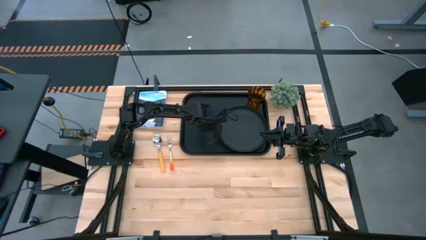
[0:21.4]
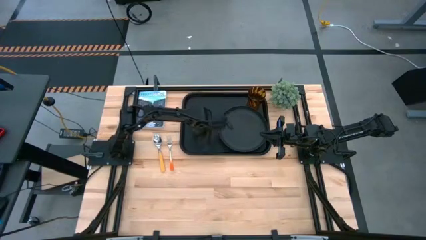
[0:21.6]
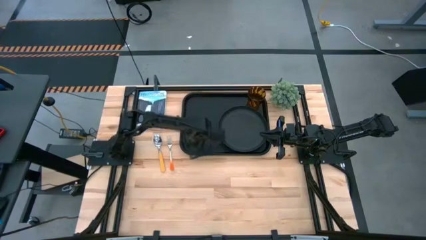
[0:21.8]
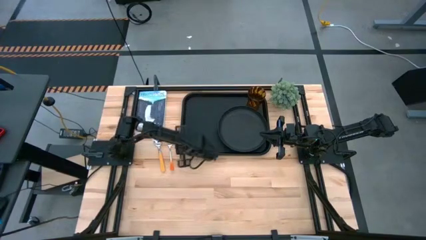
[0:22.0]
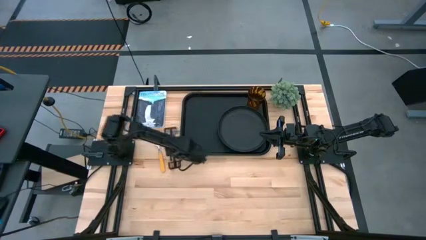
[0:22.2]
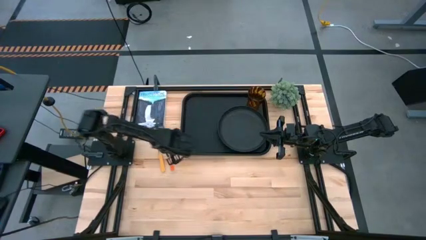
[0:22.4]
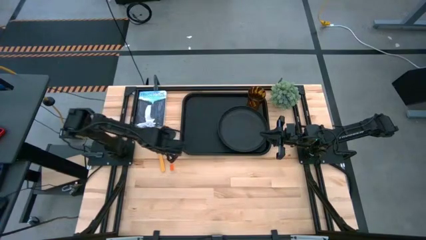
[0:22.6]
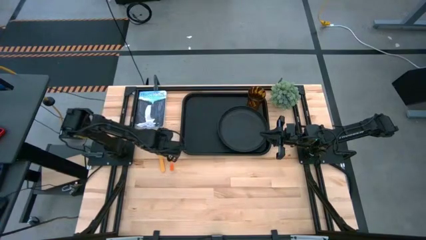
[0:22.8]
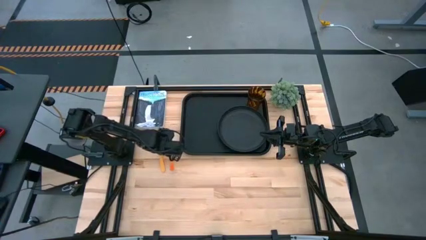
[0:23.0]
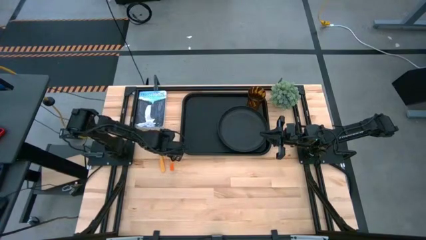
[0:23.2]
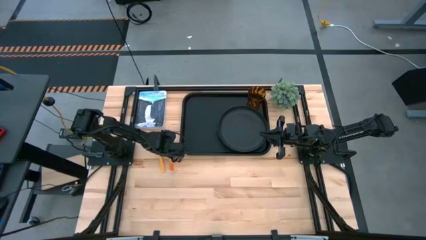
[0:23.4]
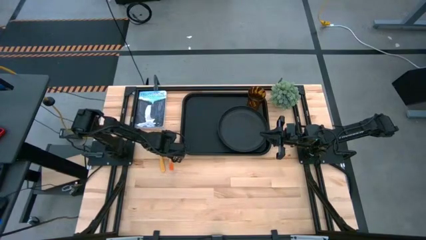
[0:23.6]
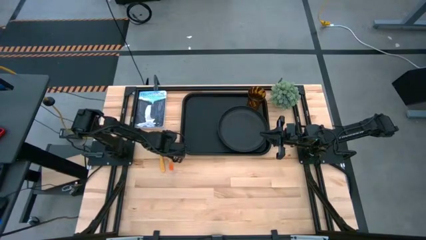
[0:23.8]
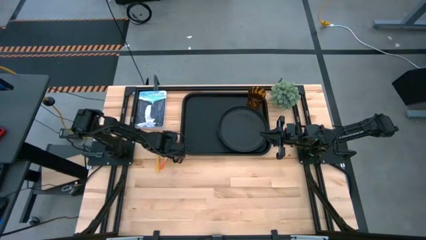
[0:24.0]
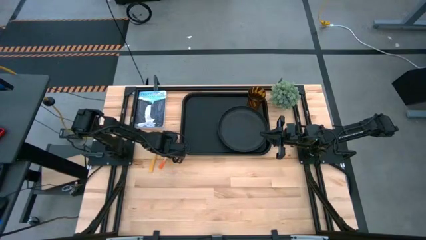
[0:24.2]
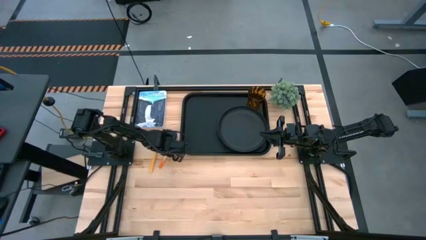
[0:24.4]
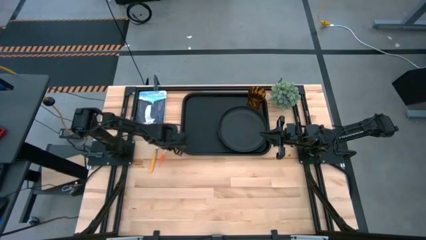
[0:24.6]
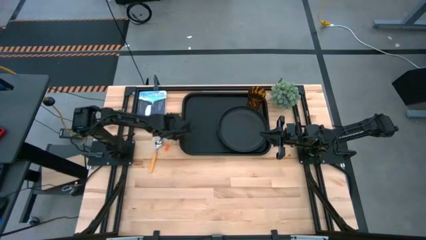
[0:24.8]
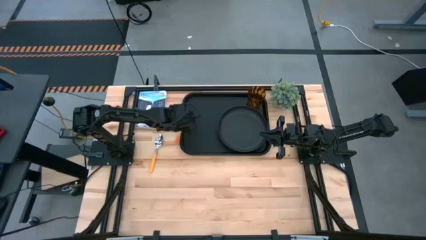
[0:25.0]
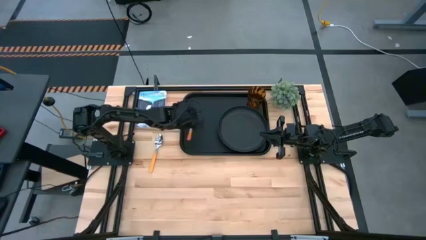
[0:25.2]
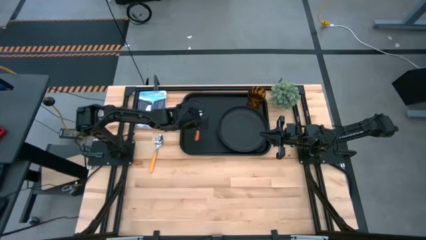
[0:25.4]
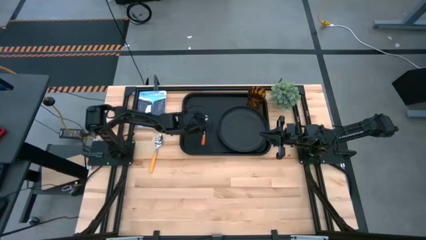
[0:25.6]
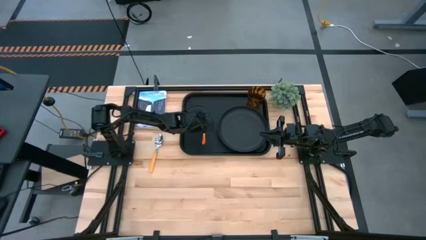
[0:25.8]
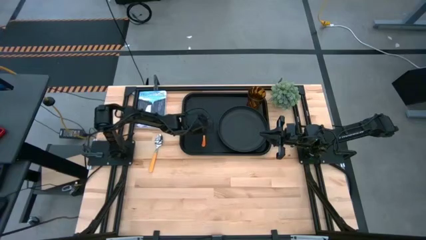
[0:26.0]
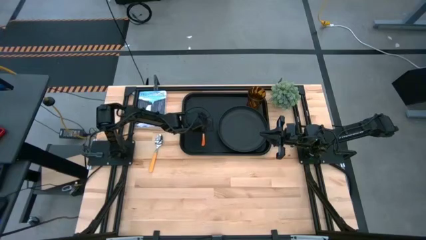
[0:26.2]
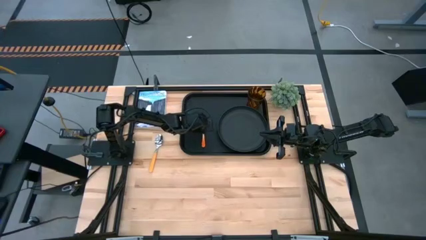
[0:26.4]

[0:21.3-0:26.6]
Task: Pick and place plate/cup/fork/spoon on tray
Put the orange fork on the black serving tray

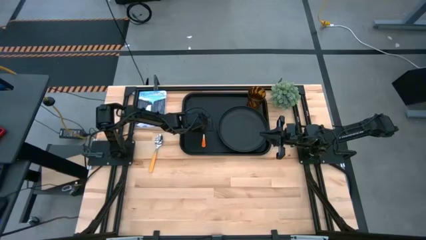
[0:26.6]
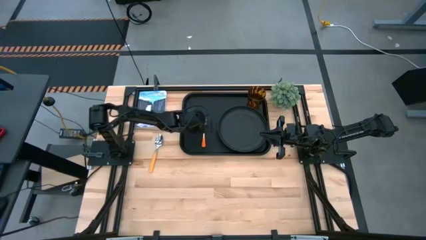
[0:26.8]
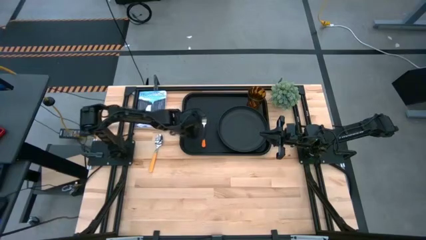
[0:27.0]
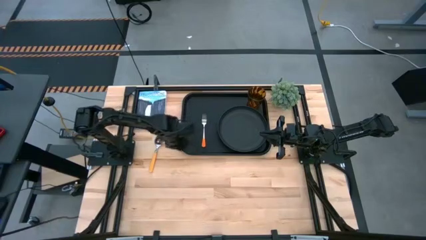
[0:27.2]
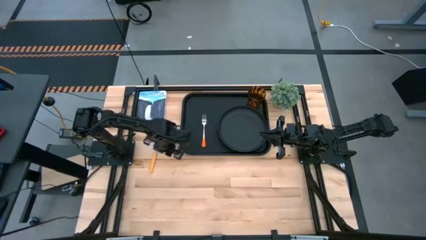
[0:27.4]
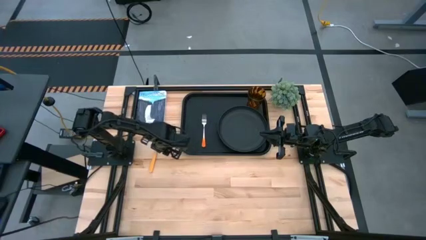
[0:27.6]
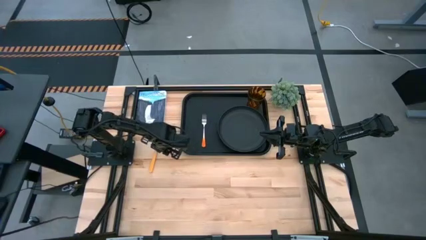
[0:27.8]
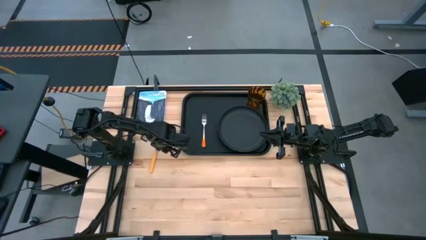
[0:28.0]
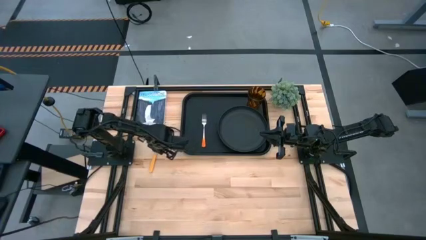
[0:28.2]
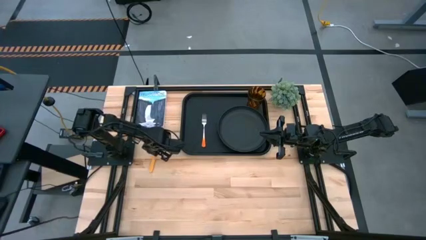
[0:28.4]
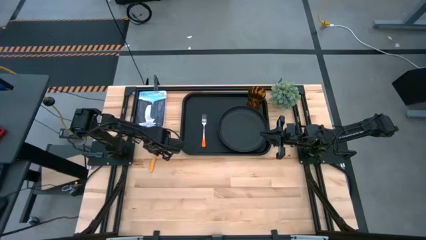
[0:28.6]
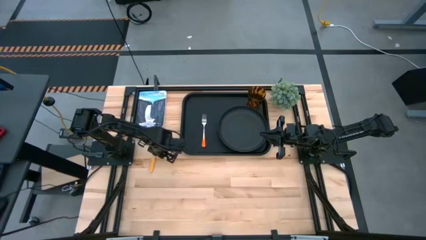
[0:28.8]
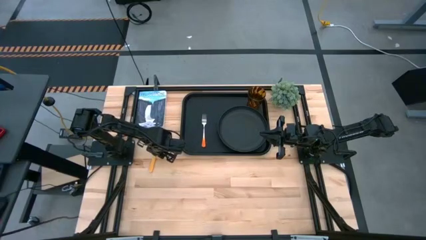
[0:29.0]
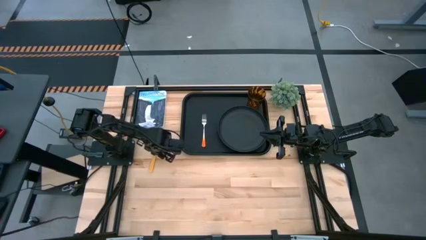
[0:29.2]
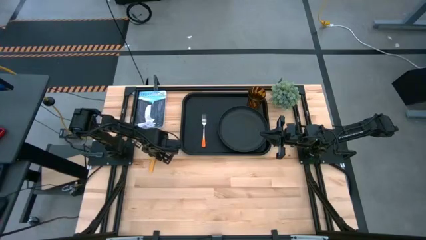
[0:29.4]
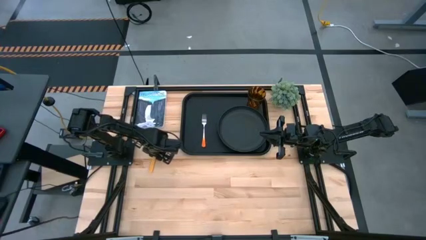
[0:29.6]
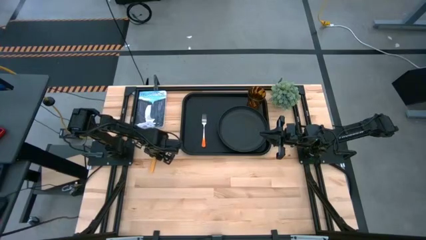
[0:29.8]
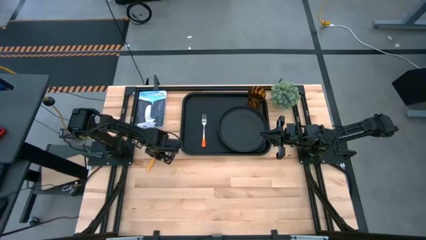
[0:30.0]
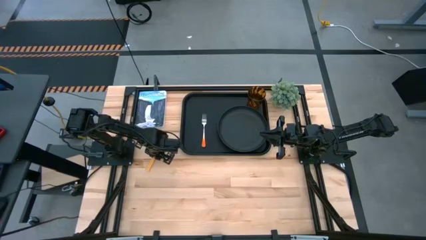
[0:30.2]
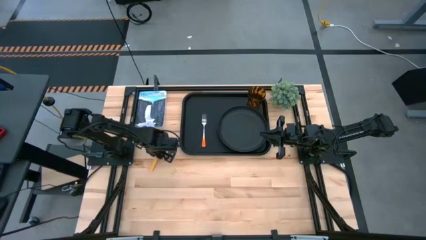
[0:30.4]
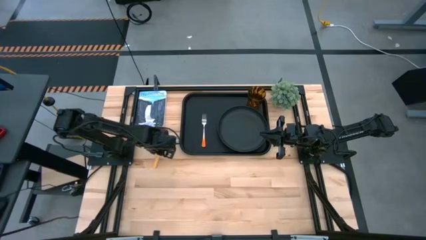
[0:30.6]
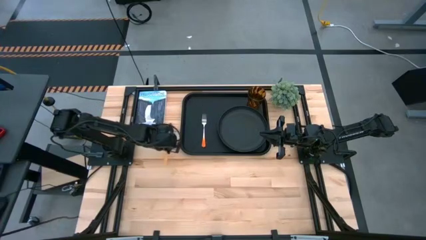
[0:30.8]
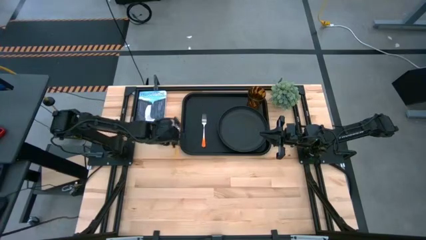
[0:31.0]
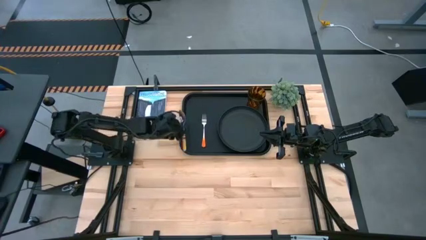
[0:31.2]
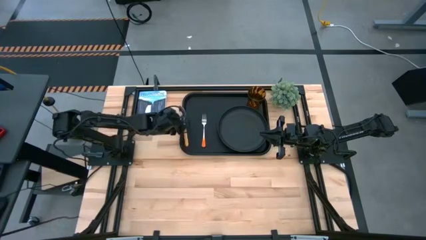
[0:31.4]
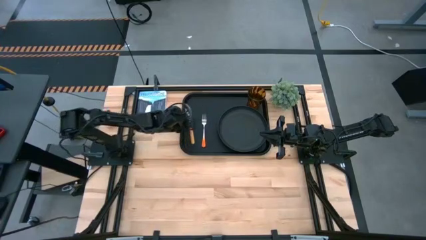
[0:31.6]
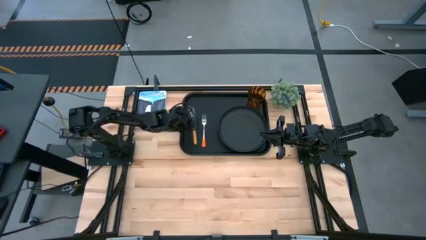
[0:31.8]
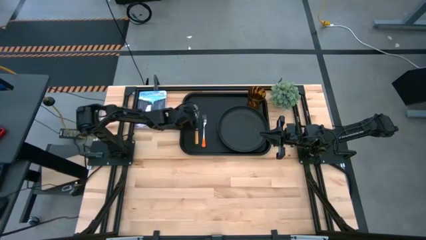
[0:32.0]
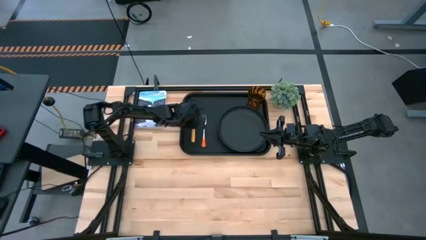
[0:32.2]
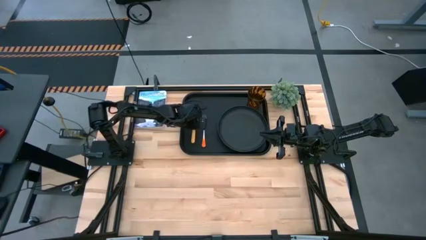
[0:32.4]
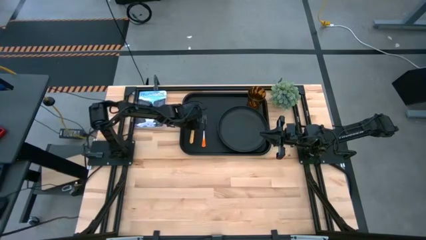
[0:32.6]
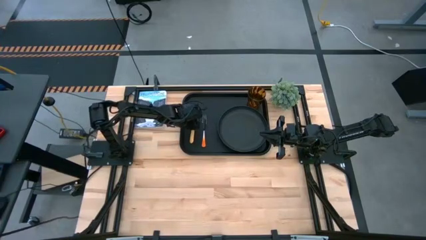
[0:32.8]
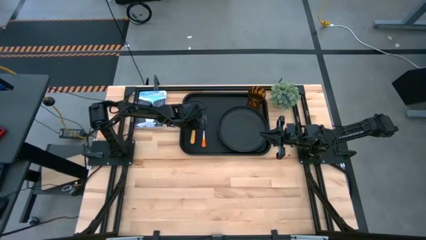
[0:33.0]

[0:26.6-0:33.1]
Put the yellow spoon on the black serving tray

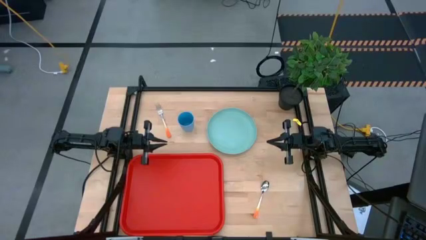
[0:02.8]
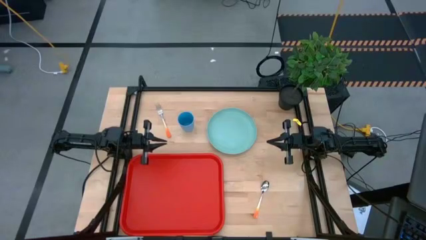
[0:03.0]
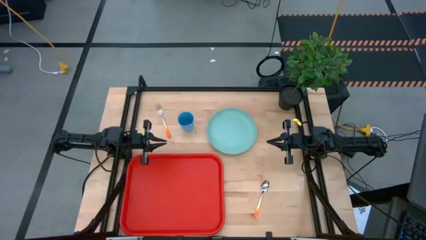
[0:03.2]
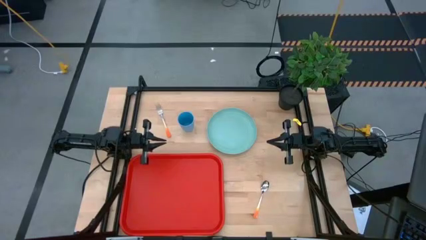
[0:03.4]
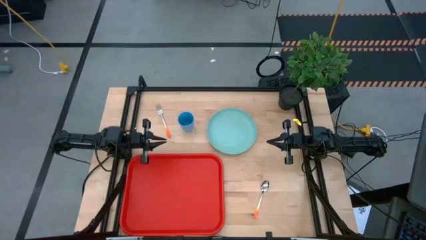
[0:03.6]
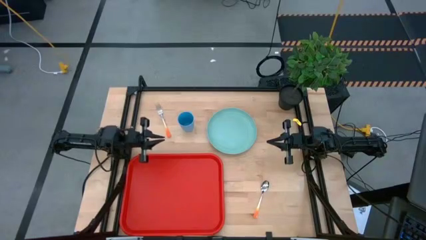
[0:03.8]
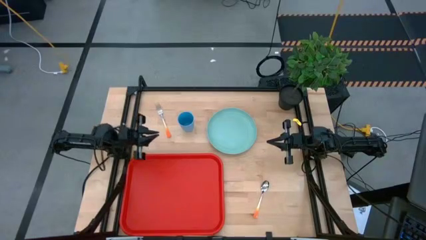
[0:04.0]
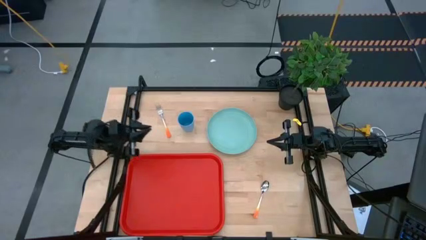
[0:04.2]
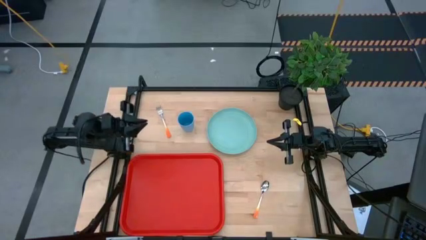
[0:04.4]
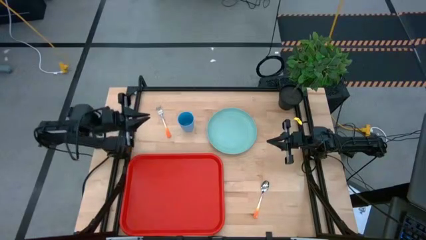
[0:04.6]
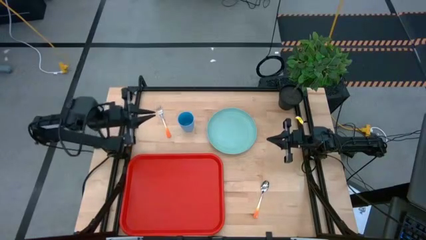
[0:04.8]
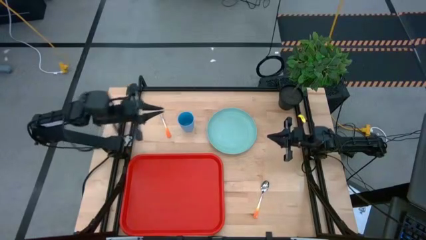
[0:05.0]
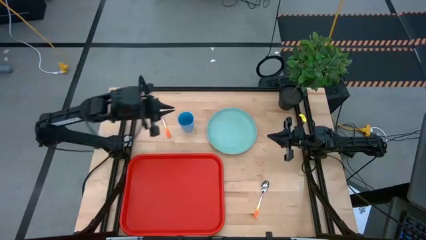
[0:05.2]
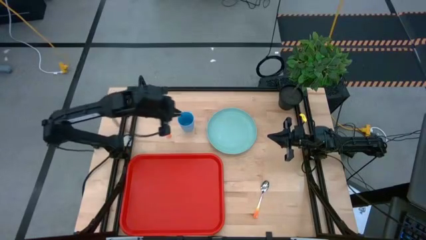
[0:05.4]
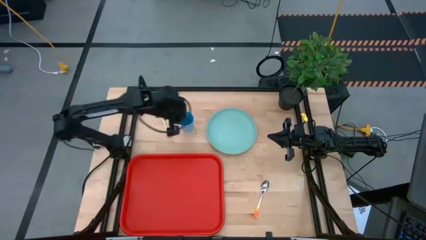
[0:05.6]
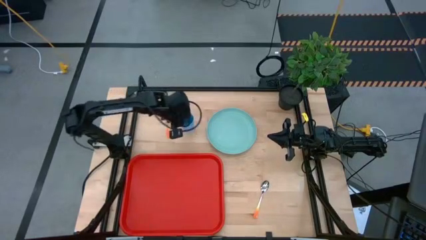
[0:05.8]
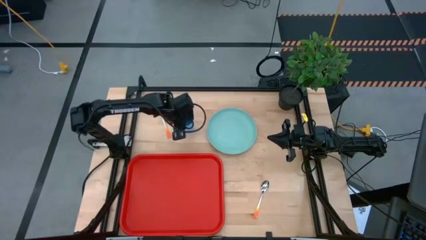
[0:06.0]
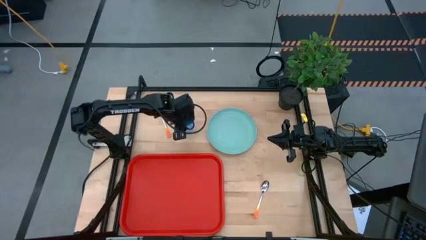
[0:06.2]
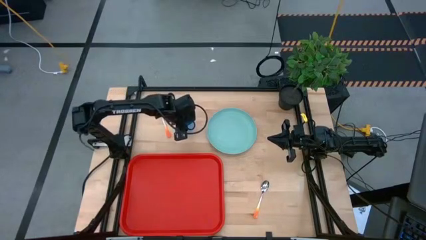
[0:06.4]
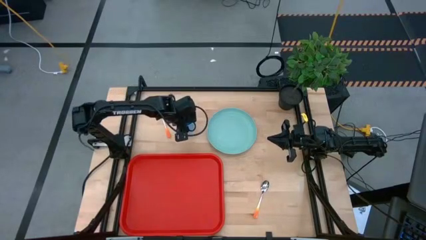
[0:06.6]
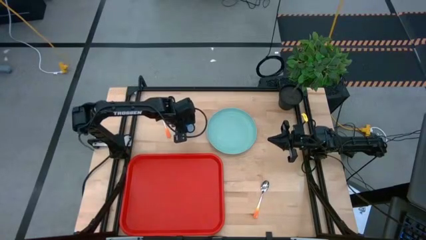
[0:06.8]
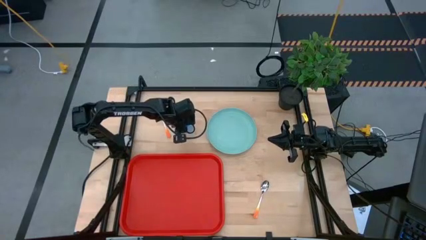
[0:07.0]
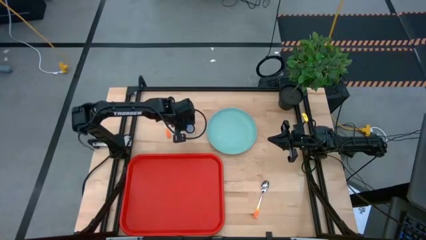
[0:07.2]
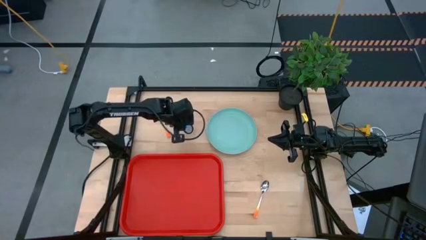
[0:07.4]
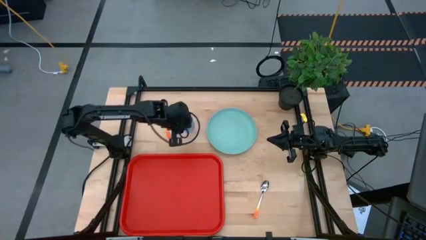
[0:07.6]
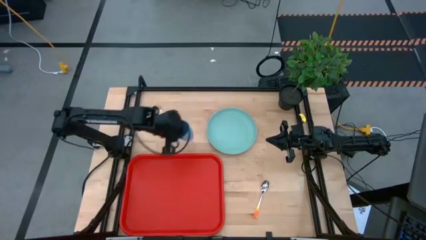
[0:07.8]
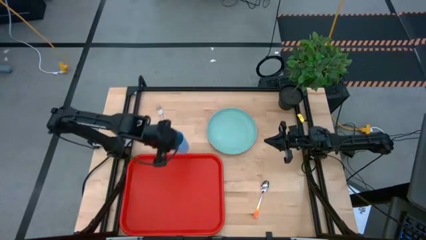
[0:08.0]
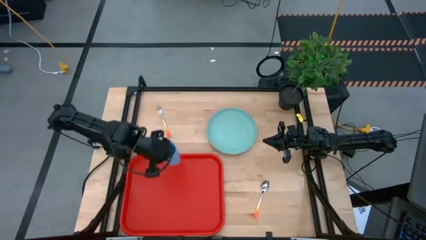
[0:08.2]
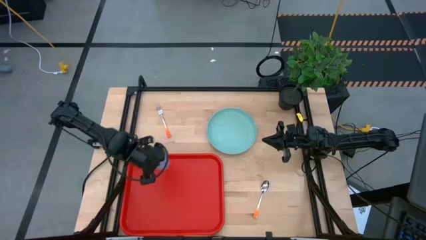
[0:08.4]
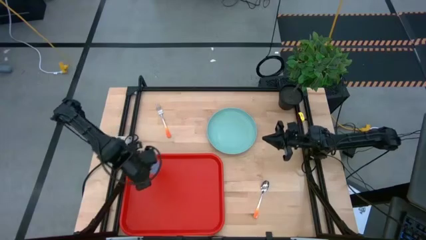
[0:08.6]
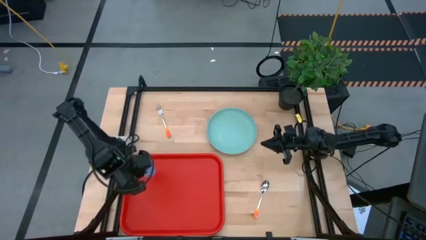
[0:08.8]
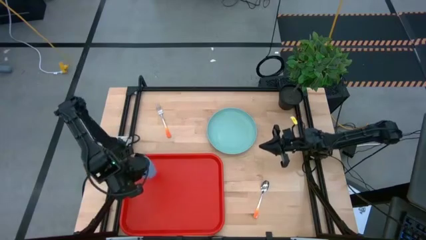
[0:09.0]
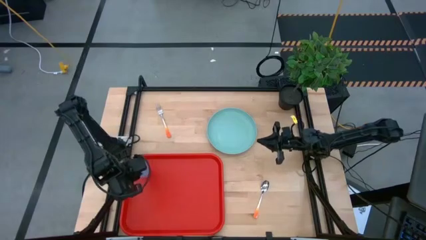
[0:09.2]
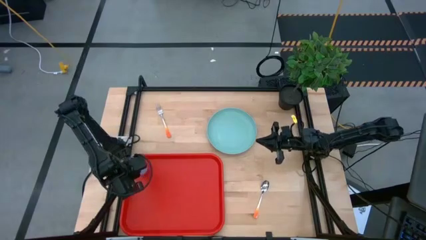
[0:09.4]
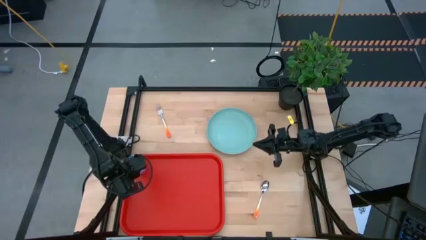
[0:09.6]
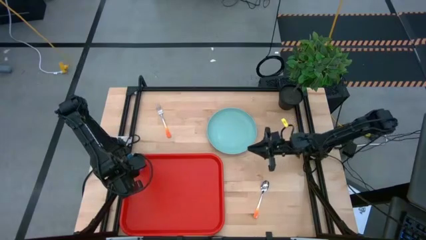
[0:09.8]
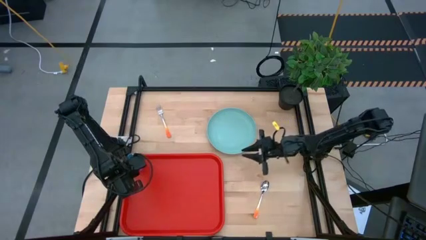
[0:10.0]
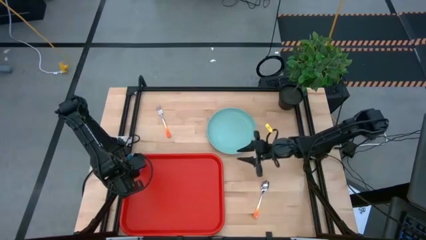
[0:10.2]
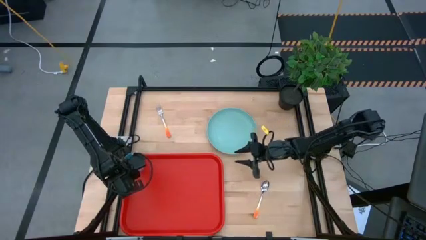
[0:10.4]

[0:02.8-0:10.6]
Task: Pick and place plate/cup/fork/spoon on tray
Put the blue cup on the tray
